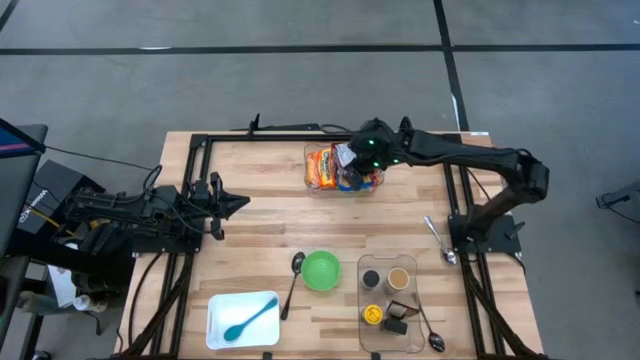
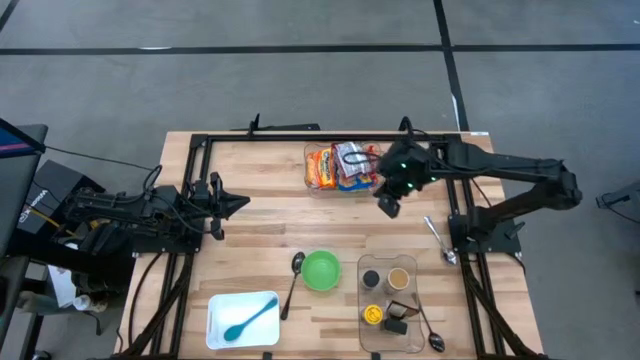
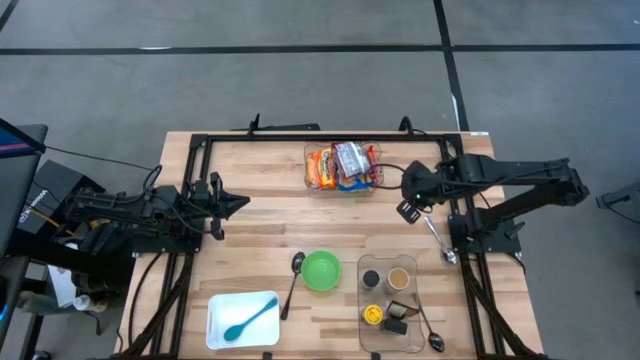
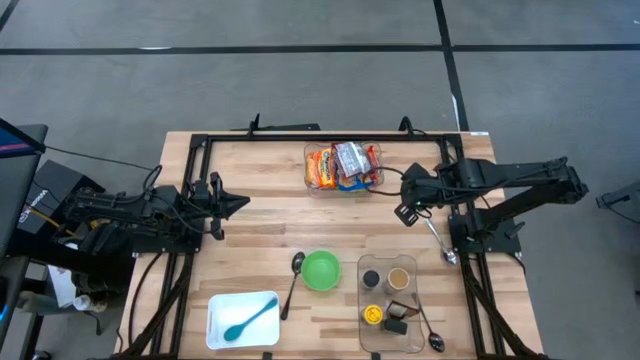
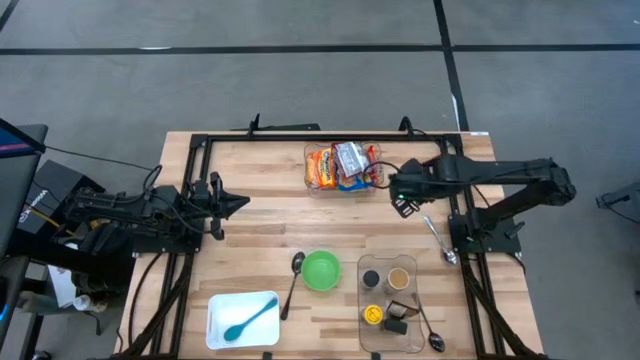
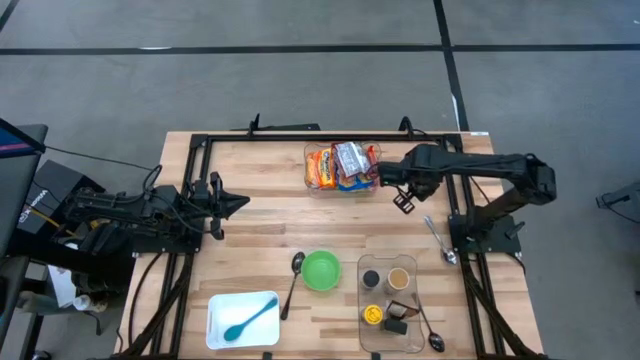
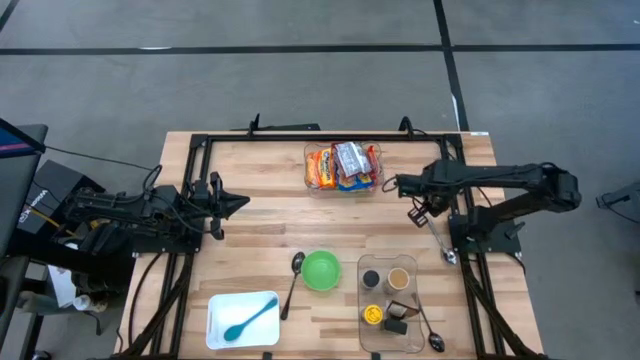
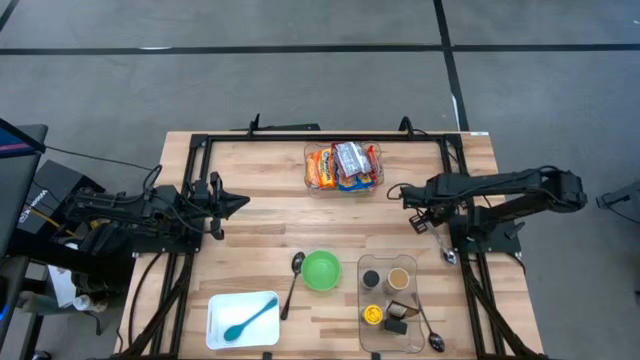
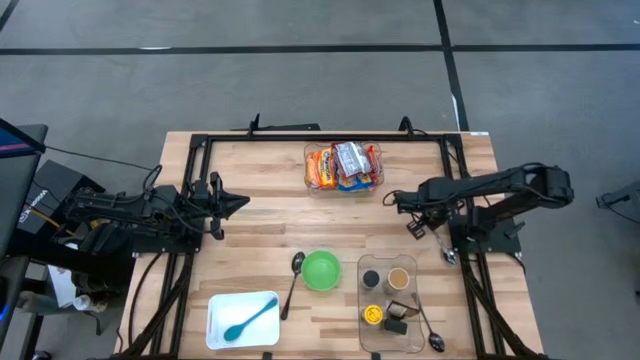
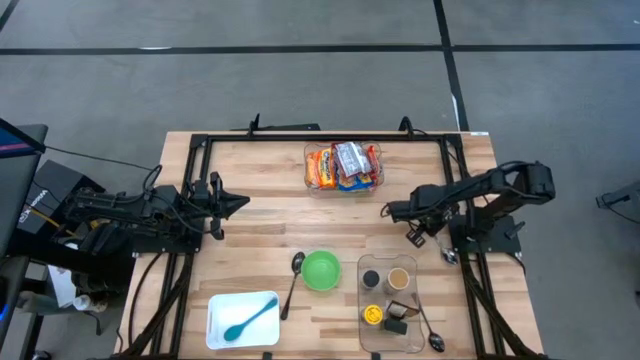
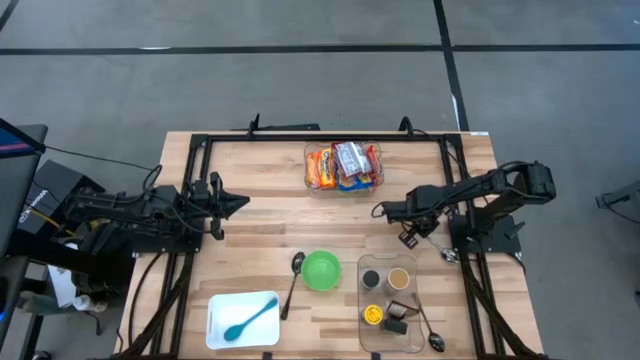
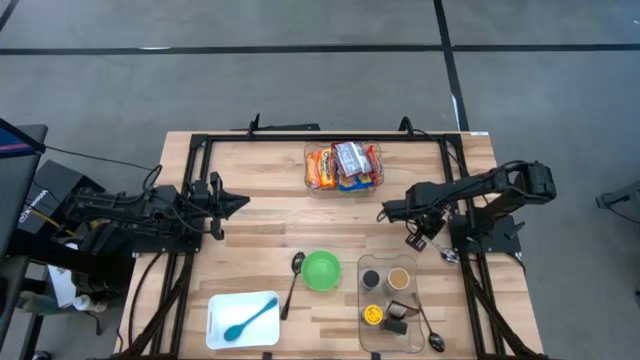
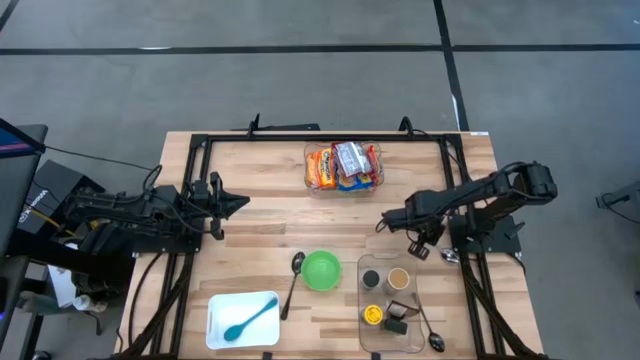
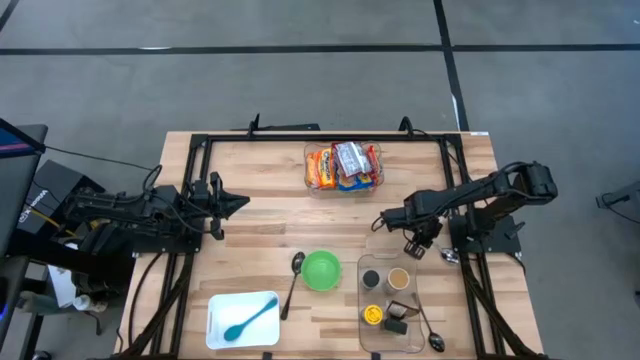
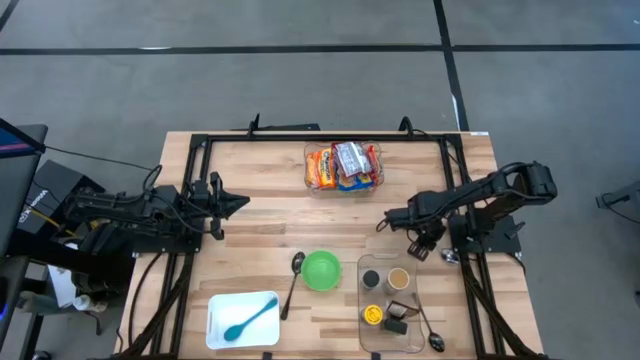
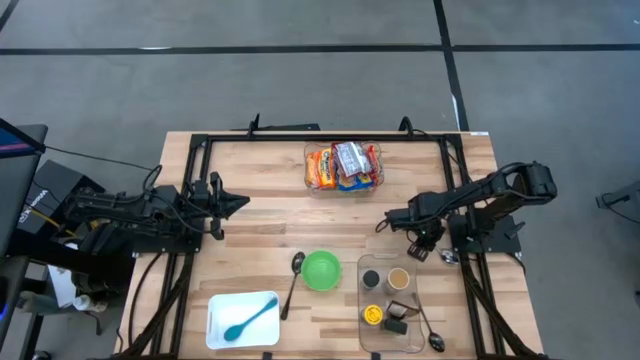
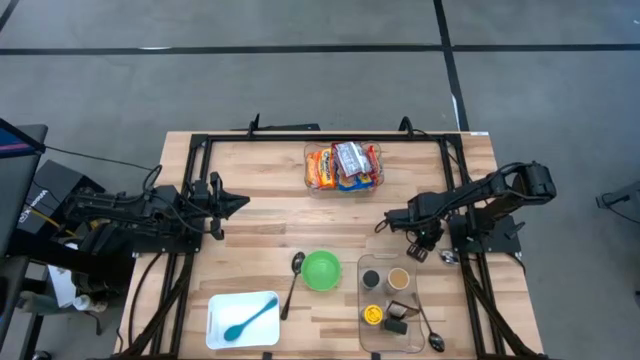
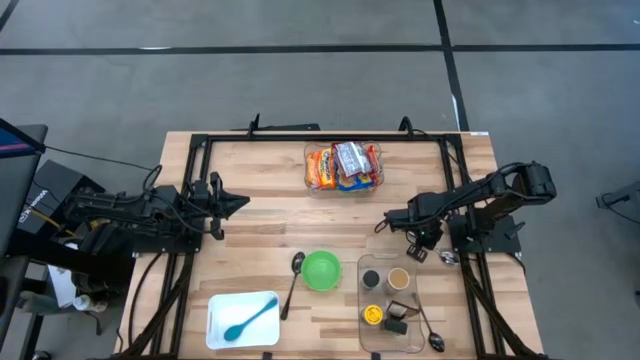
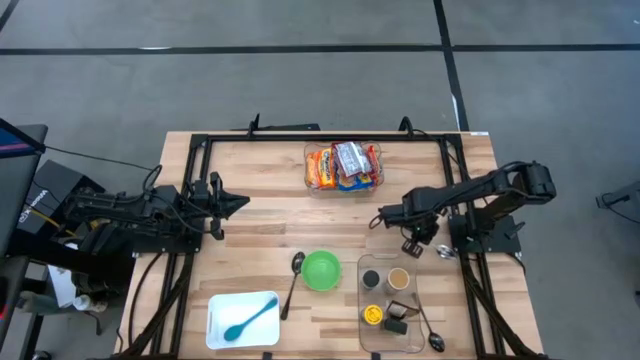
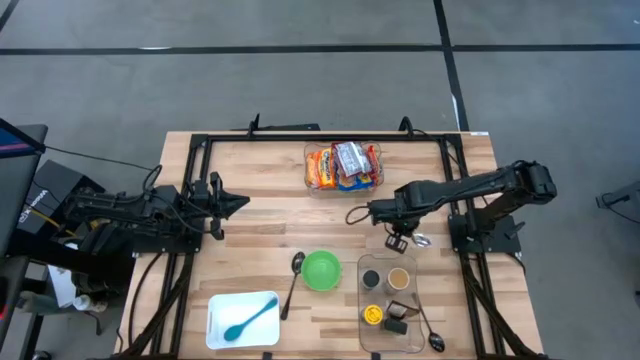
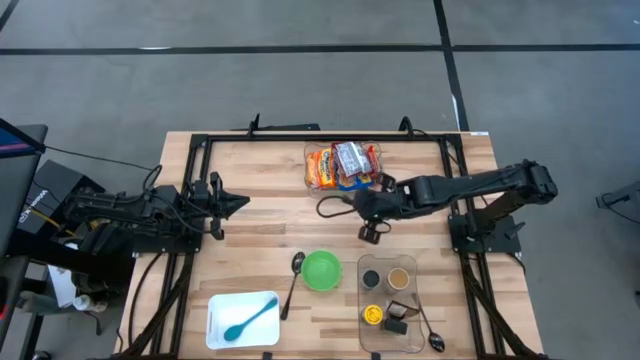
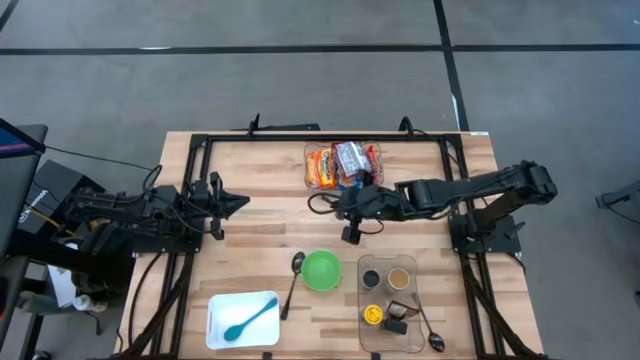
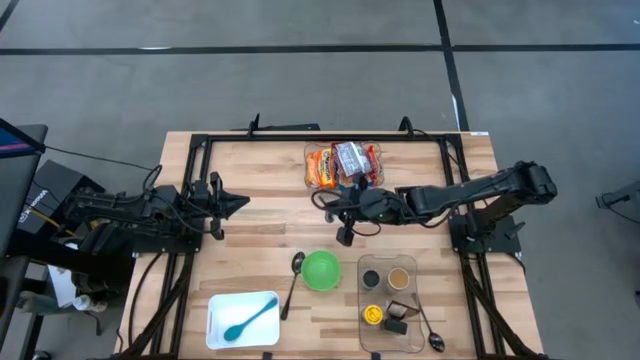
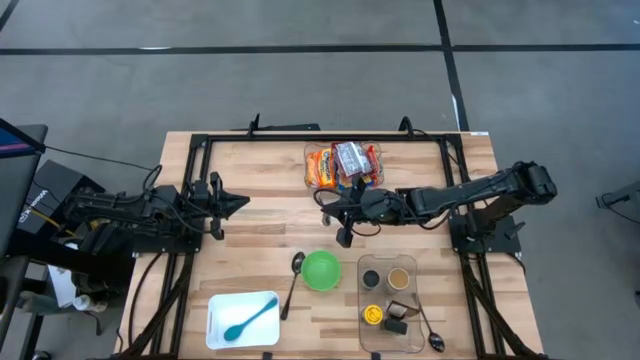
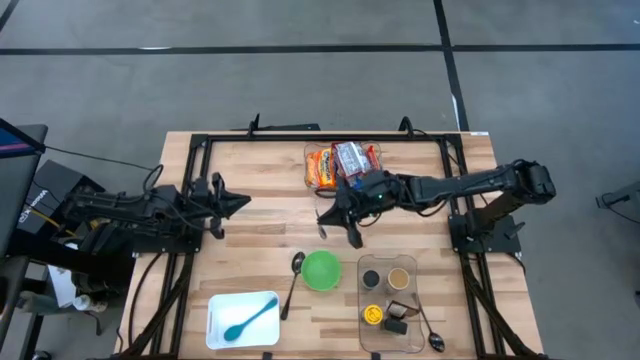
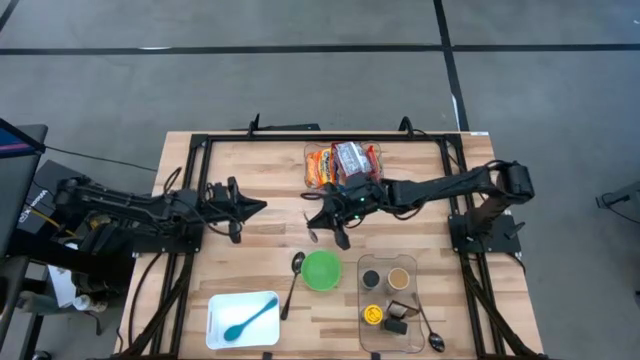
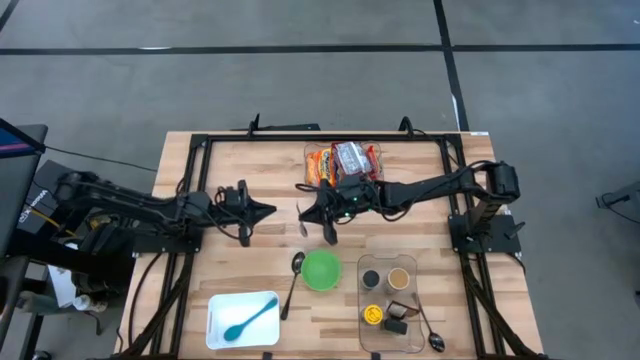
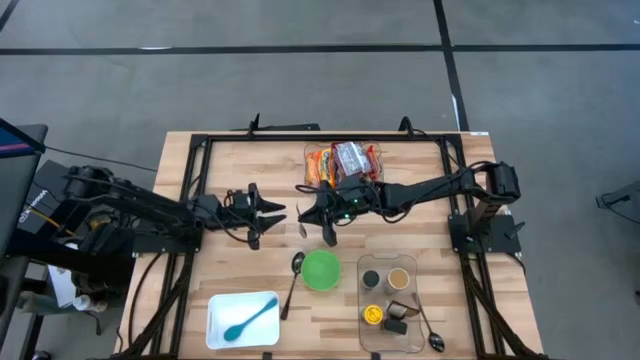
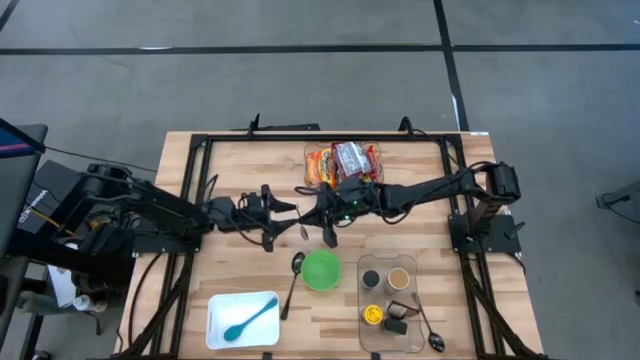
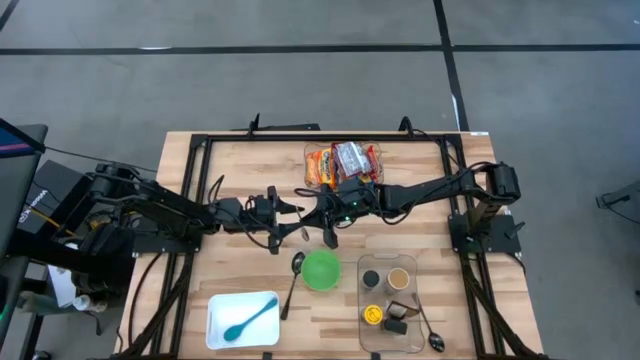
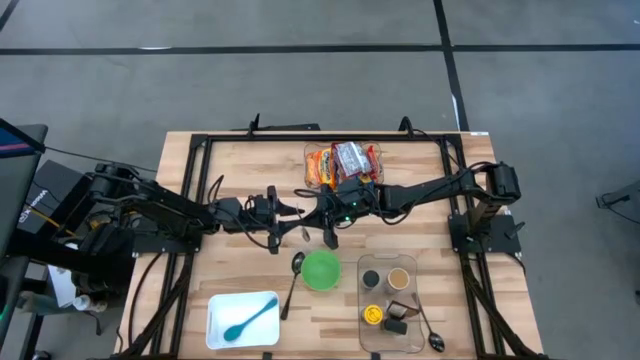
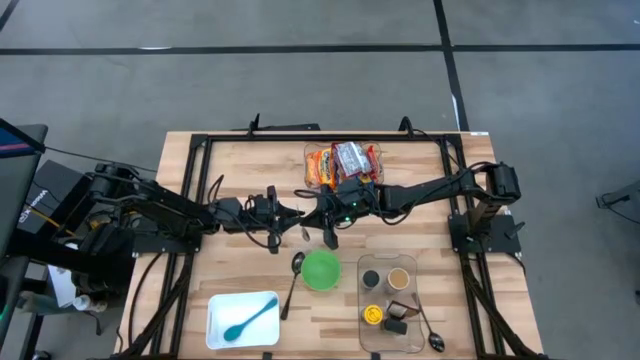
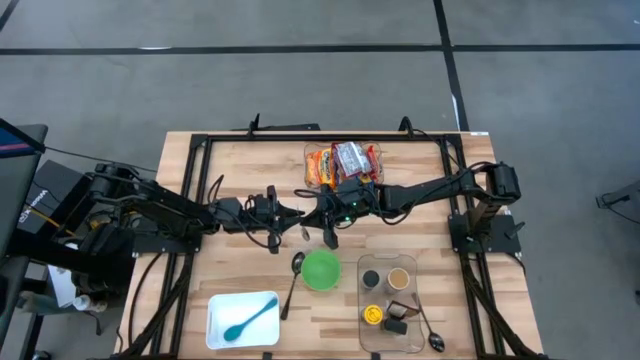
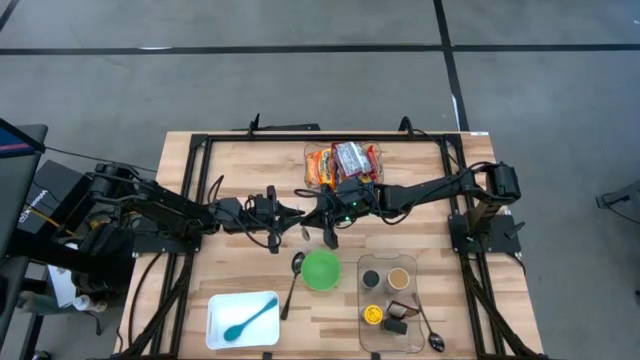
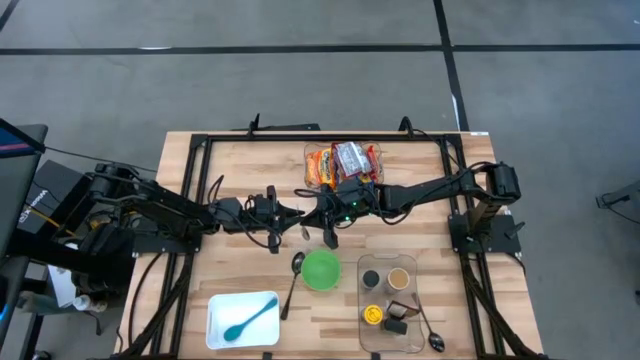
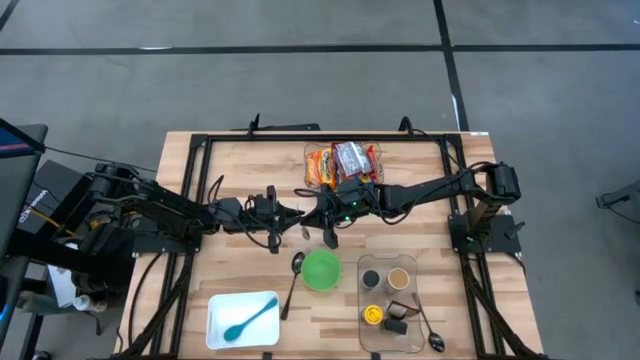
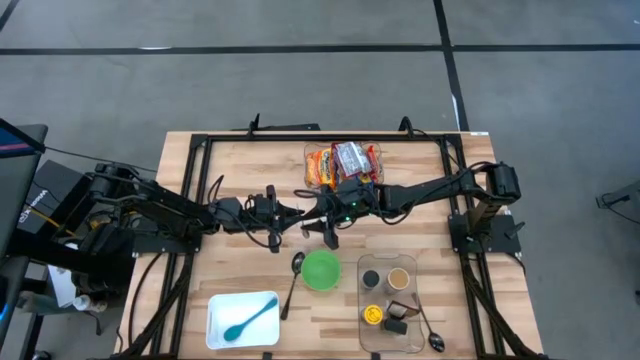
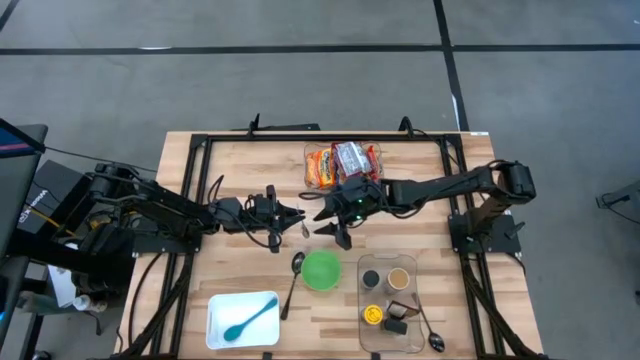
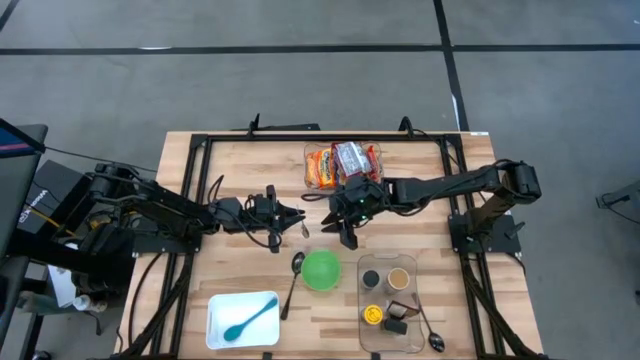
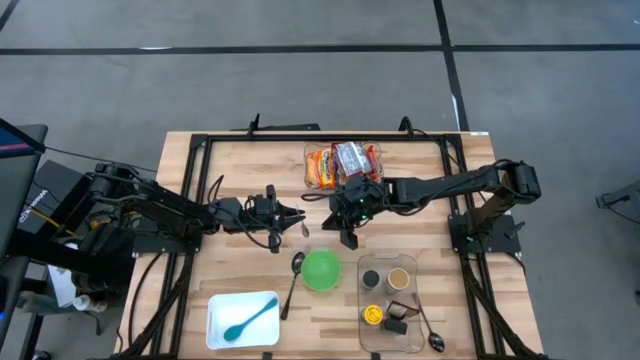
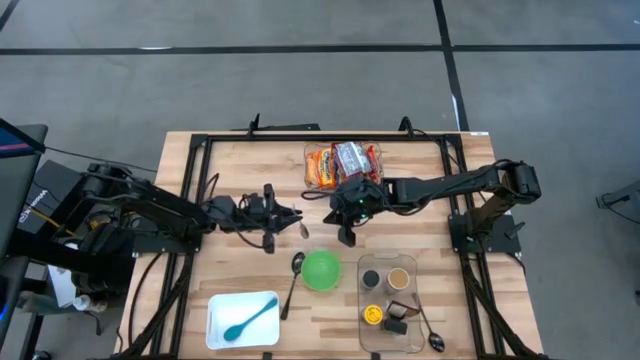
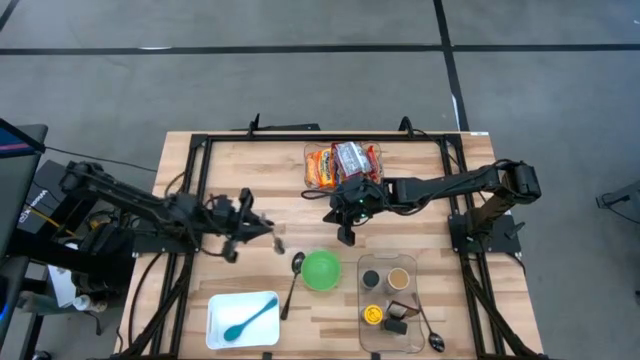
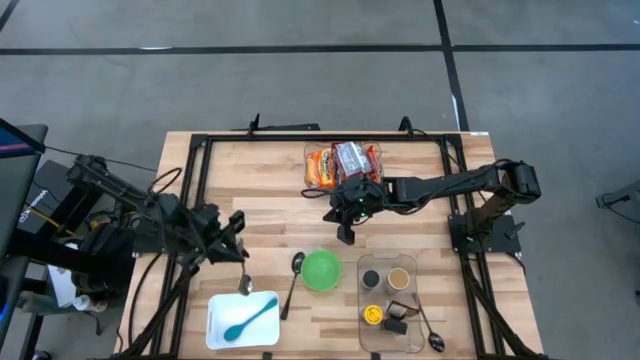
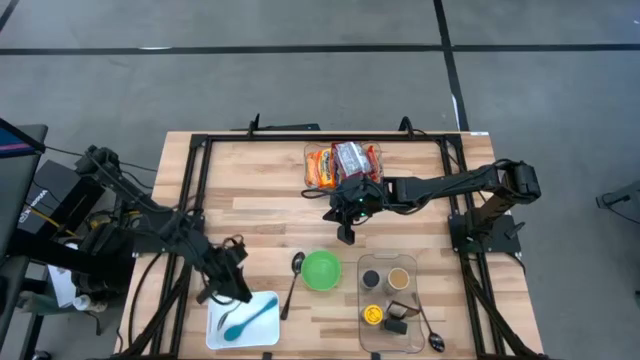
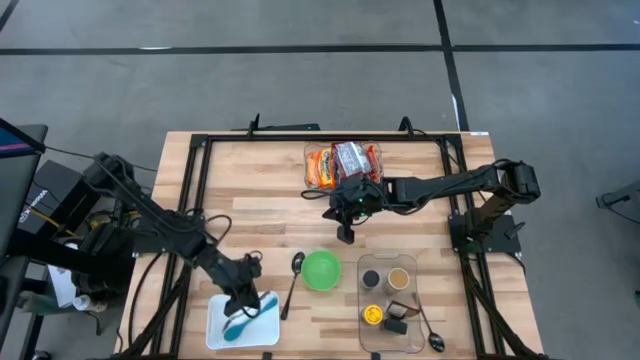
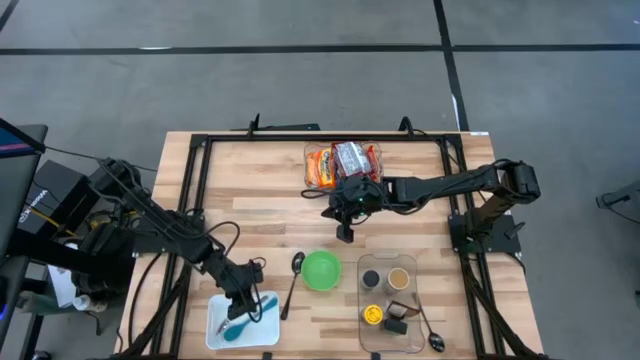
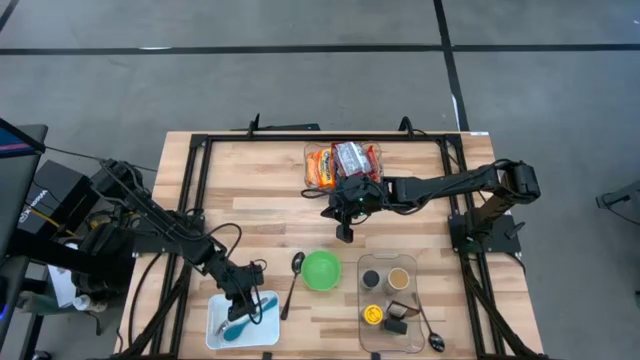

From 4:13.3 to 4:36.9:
Task: Pick & Place Food Item
Put the silver spoon into the white bin
